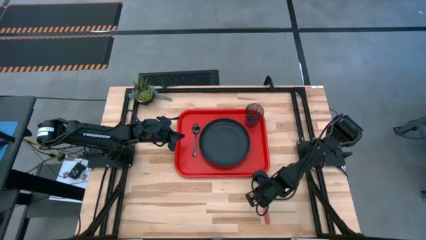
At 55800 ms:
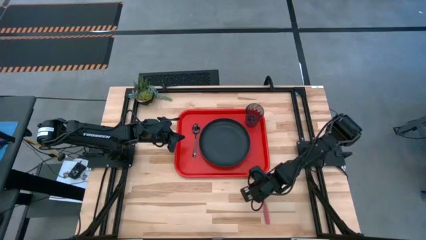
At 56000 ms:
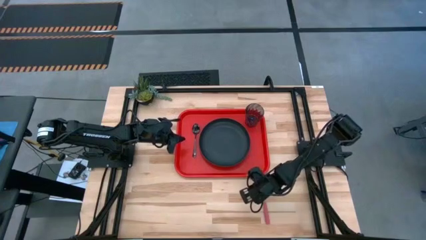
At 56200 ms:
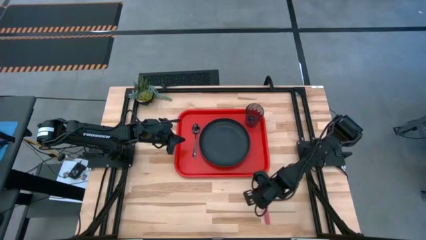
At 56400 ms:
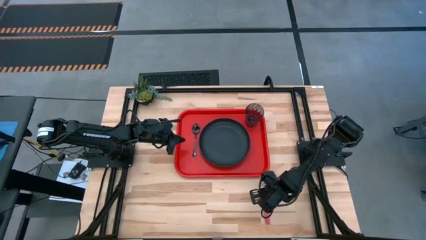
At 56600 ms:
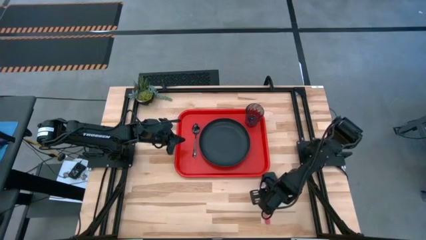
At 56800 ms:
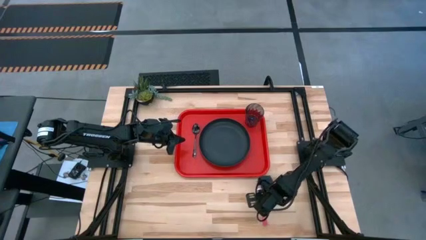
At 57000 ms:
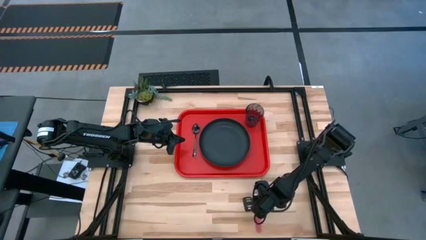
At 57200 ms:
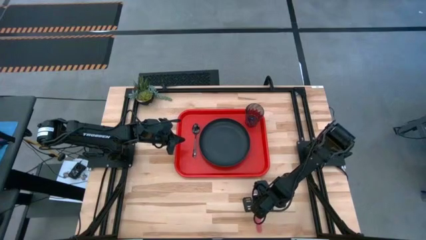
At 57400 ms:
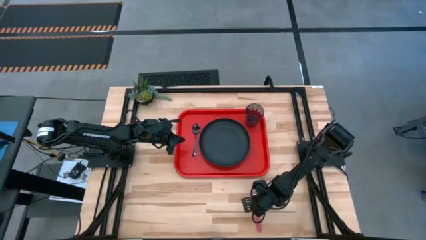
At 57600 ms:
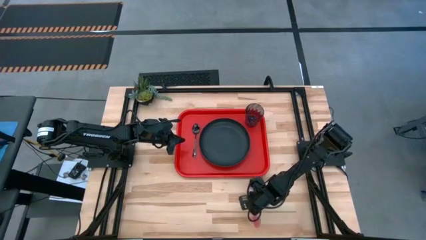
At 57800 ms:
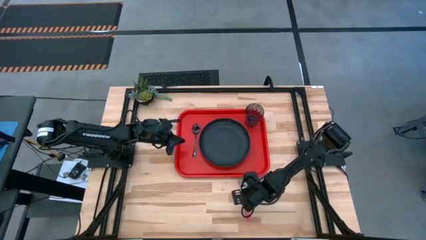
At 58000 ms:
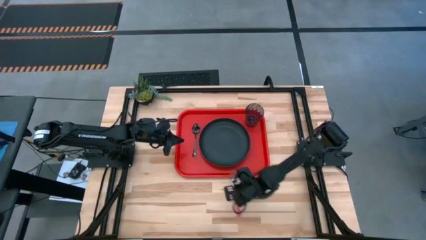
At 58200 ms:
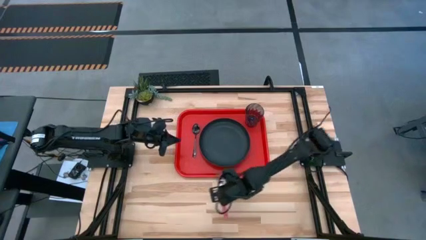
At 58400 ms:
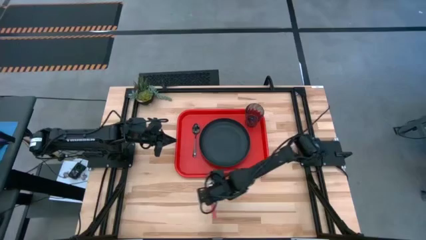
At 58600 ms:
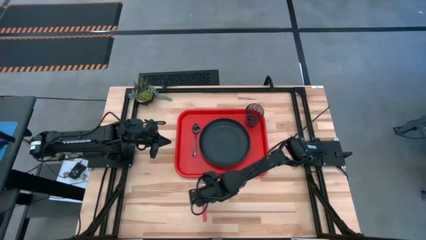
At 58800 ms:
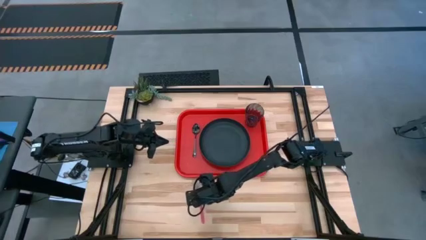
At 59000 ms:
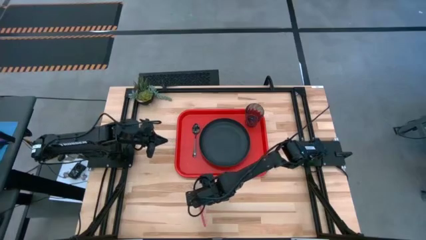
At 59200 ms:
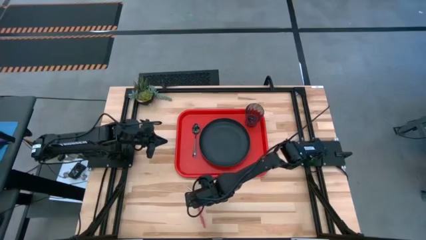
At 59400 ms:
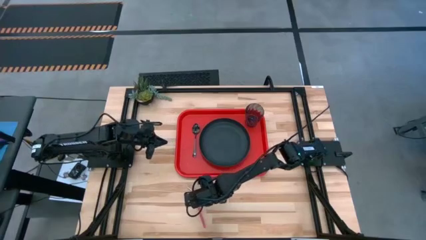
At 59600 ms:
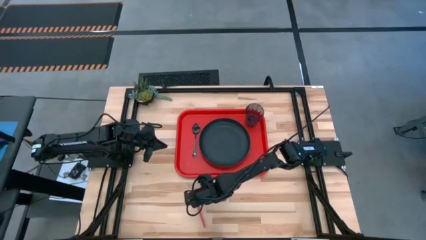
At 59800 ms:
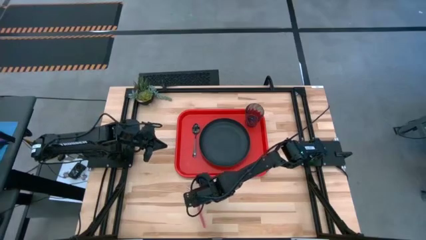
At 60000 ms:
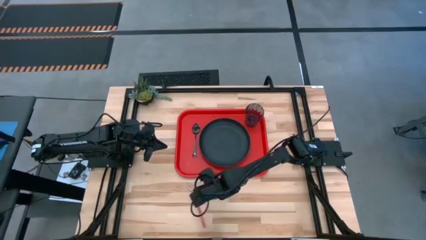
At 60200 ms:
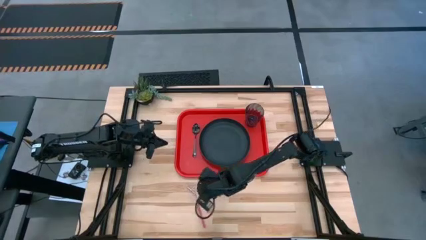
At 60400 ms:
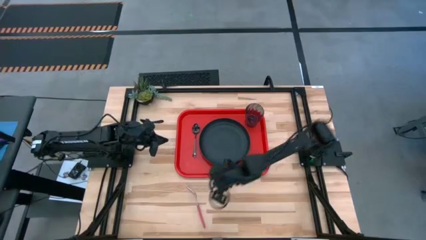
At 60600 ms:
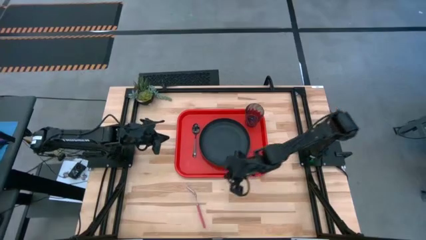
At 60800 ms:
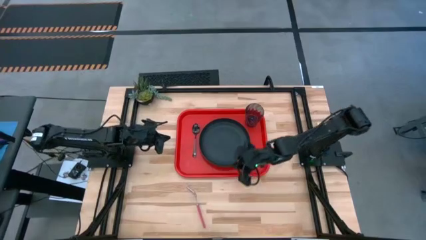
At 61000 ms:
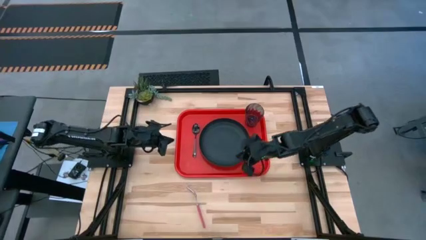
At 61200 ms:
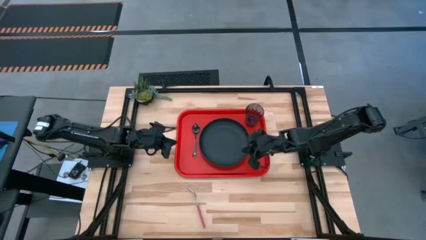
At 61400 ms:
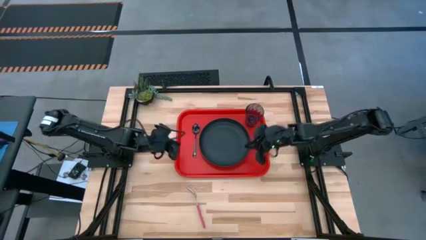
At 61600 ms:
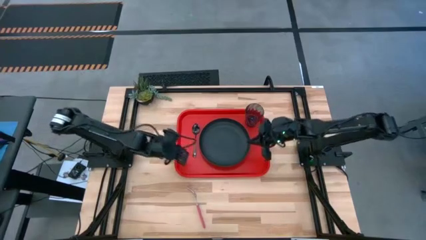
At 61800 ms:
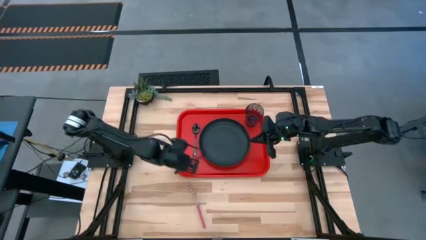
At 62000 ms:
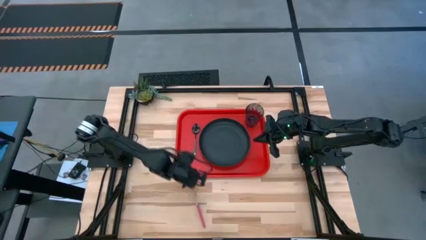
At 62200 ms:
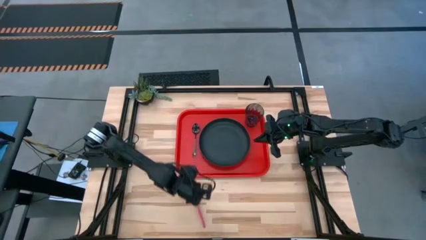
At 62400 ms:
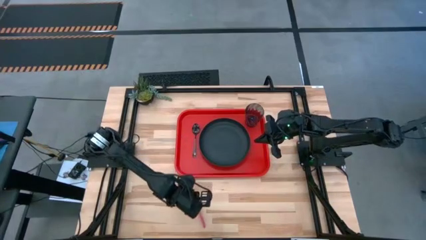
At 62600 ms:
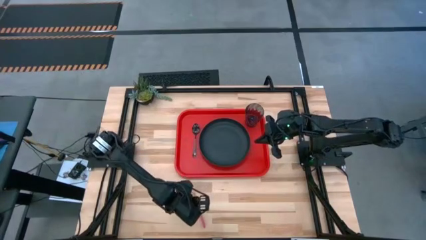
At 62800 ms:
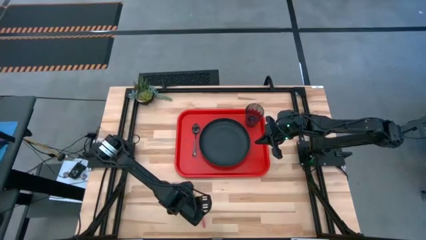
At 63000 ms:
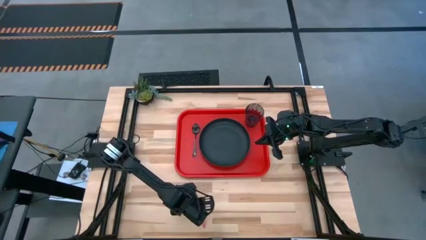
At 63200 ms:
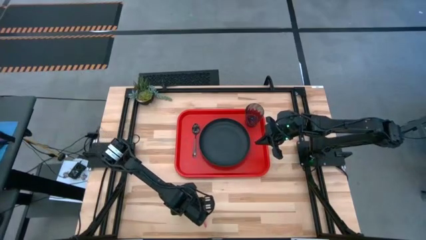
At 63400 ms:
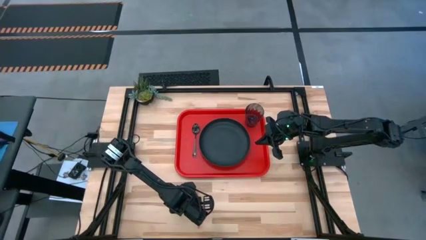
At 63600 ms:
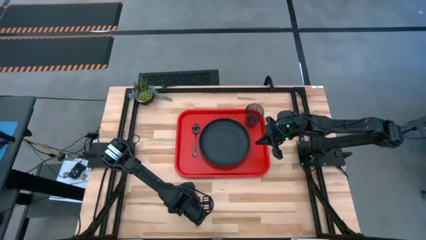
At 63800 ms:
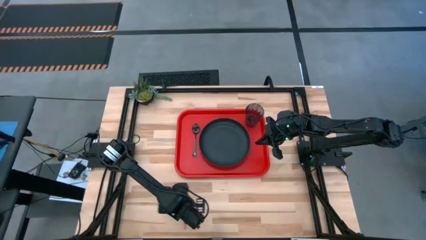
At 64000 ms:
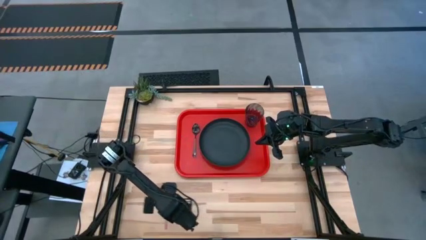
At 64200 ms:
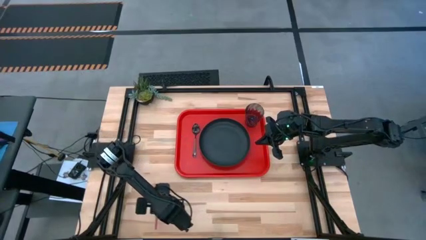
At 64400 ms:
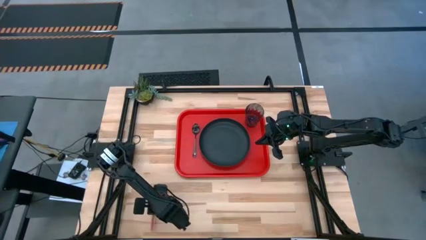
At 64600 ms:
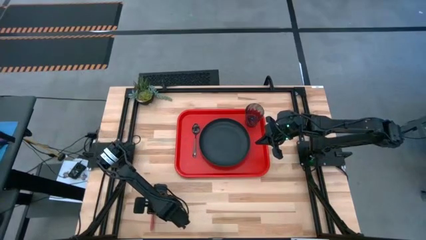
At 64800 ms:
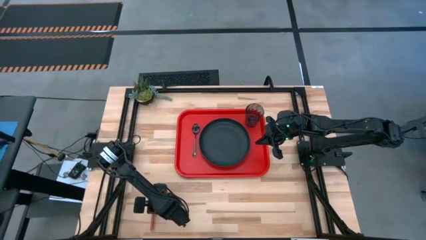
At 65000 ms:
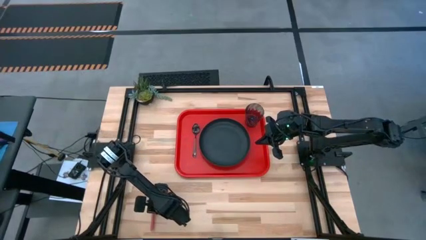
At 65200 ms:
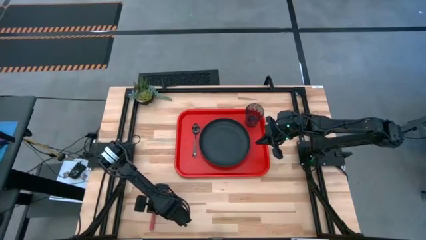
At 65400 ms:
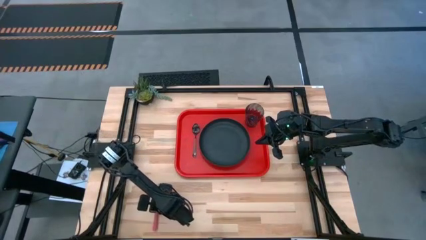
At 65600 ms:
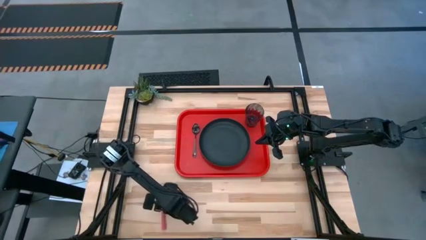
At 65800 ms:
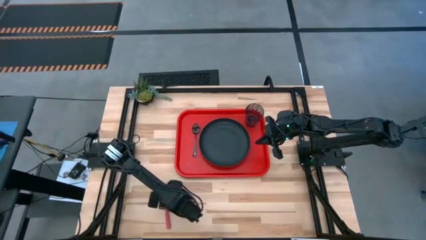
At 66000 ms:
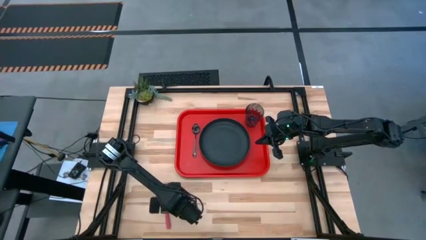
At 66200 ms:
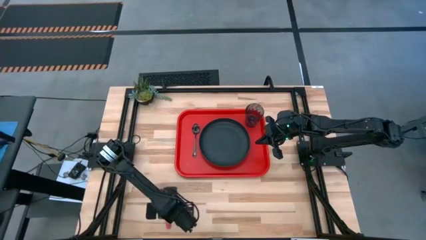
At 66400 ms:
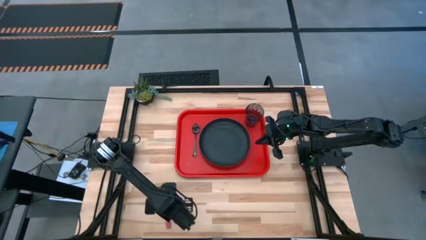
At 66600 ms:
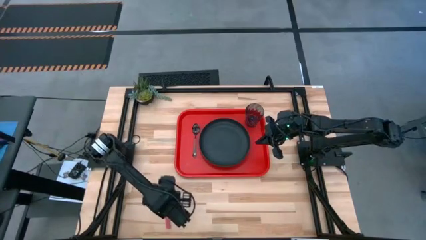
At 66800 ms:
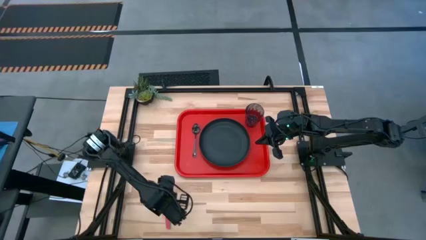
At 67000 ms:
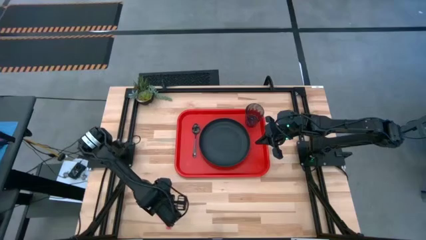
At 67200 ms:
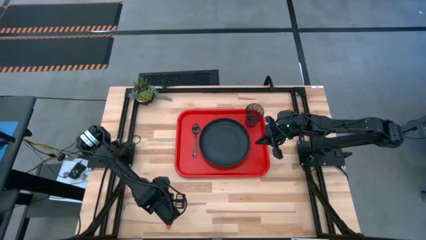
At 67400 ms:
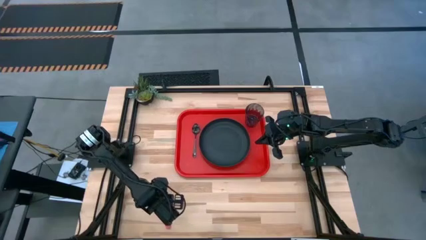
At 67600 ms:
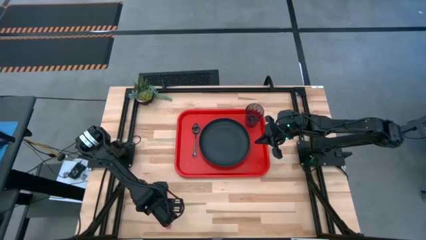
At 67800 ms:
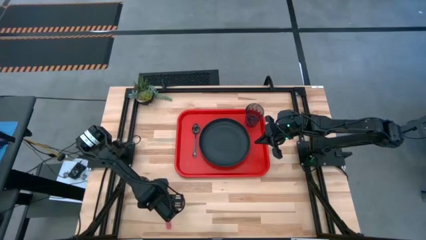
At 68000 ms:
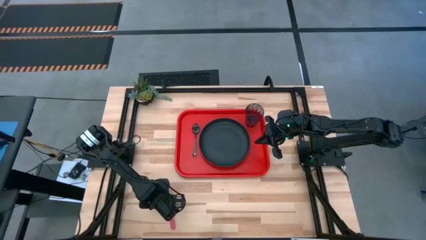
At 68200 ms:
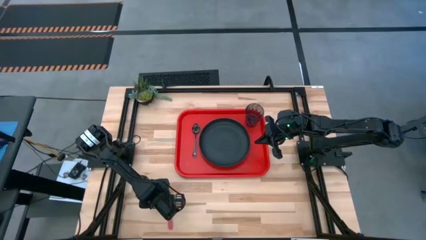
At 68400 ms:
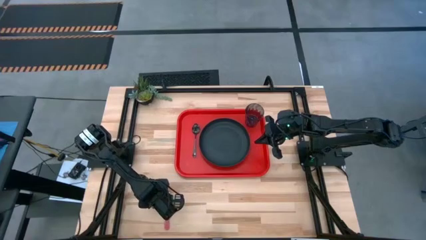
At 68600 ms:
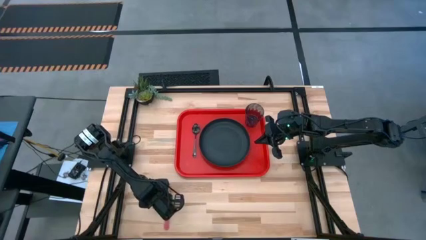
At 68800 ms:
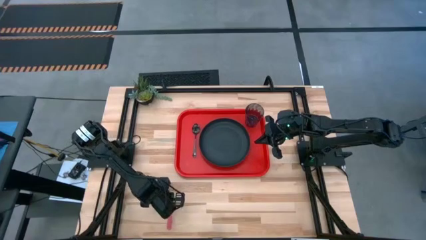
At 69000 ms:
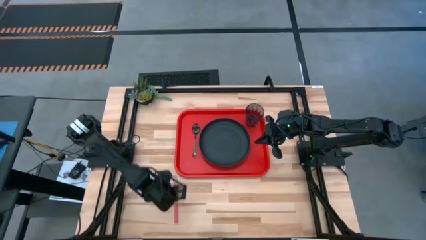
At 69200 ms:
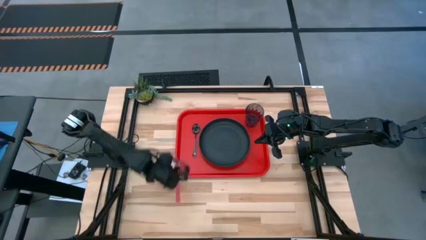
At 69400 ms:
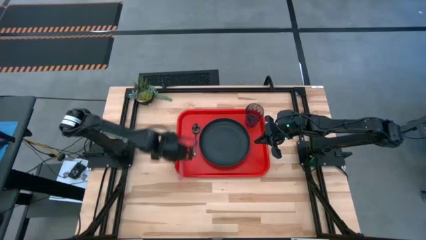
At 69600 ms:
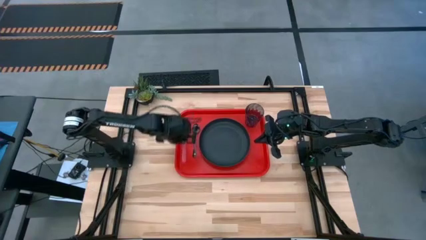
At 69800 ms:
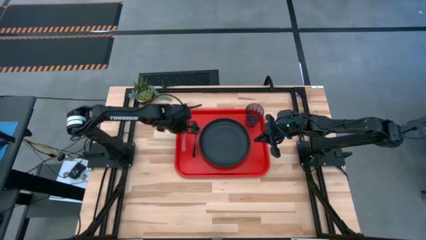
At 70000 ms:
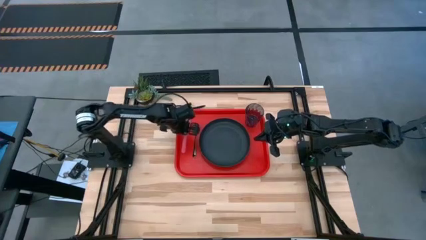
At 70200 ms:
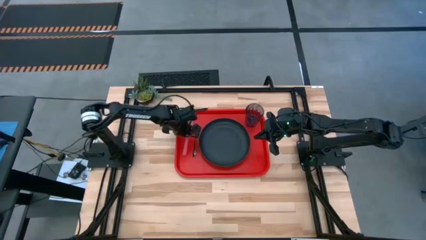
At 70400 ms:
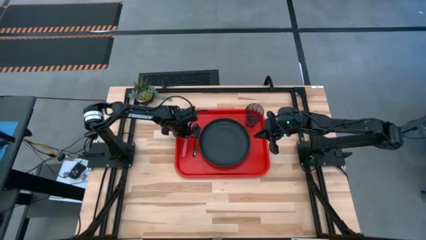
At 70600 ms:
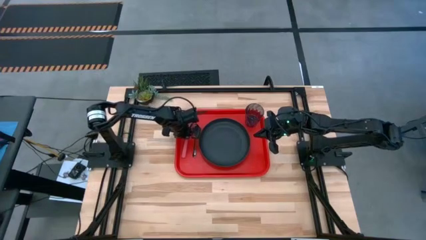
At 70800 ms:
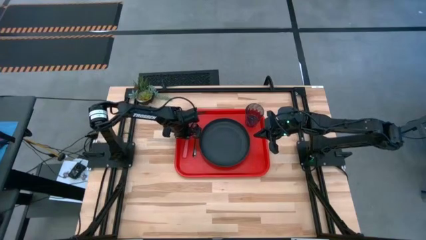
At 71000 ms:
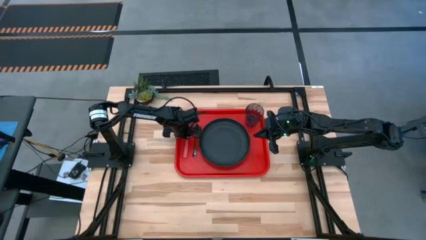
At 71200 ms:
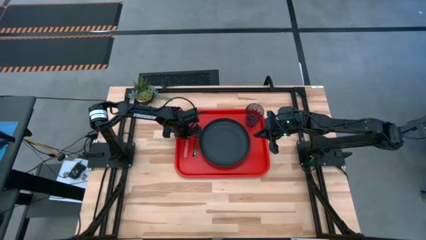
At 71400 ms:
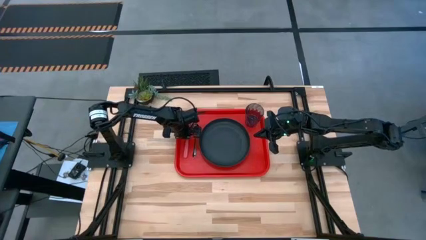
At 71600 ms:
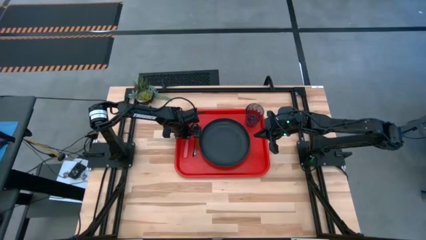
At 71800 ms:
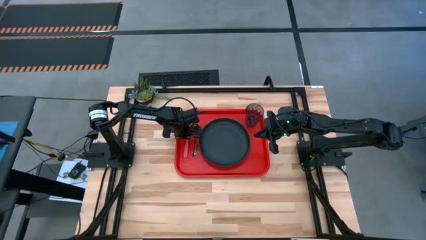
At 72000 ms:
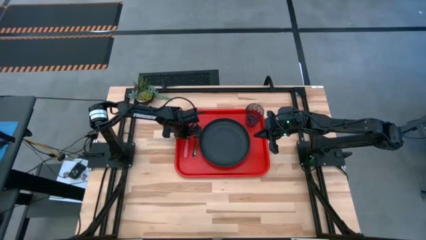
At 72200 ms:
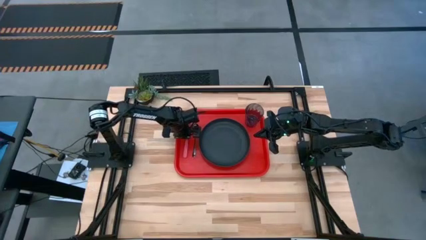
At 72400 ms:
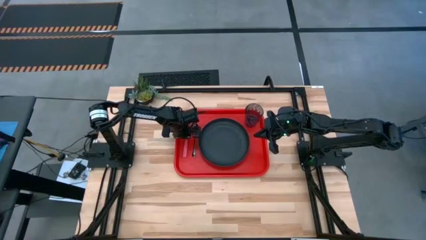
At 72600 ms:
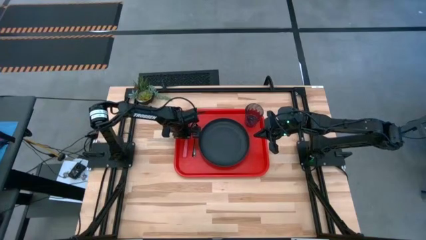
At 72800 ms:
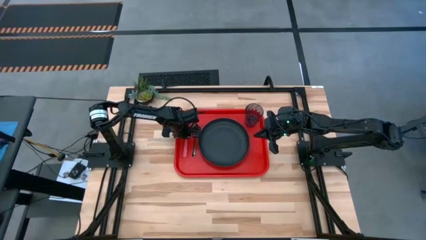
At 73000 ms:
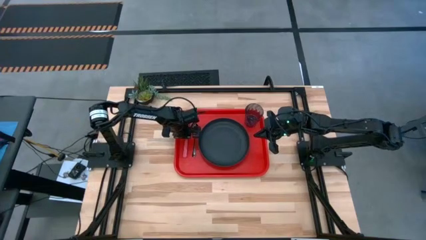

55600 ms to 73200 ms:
Task: Pick and place plate/cup/fork/spoon on tray
Put the red fork on the red serving tray to the left of the black spoon
